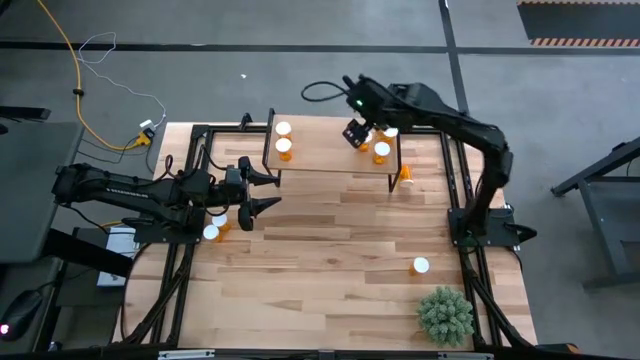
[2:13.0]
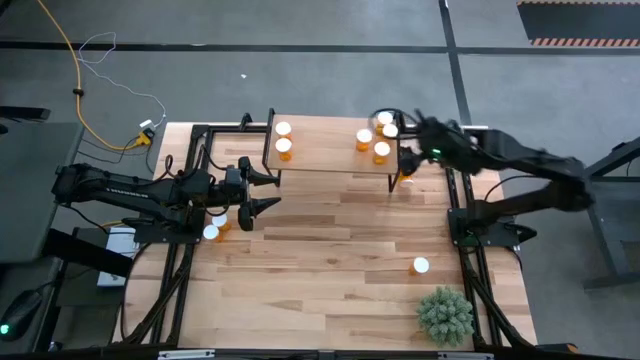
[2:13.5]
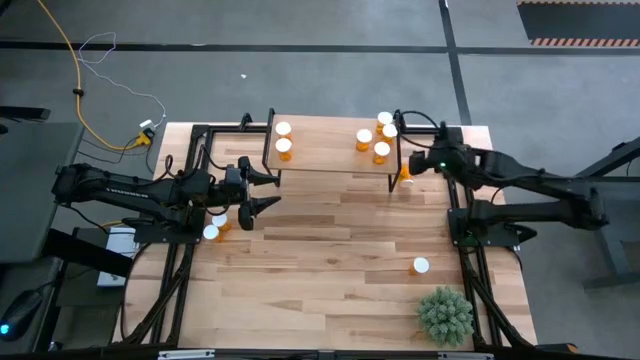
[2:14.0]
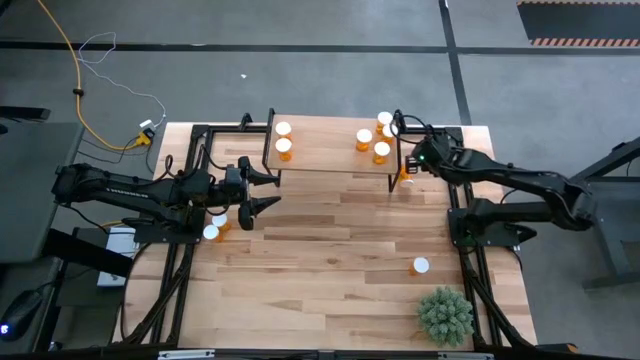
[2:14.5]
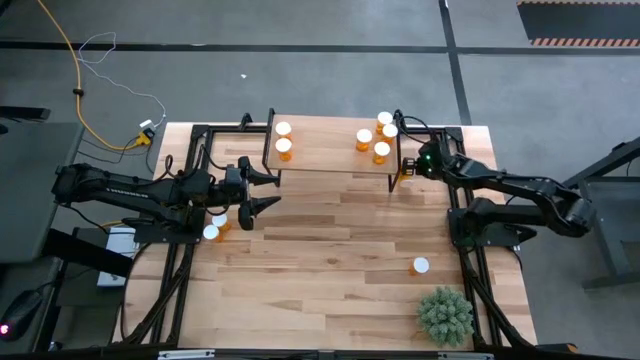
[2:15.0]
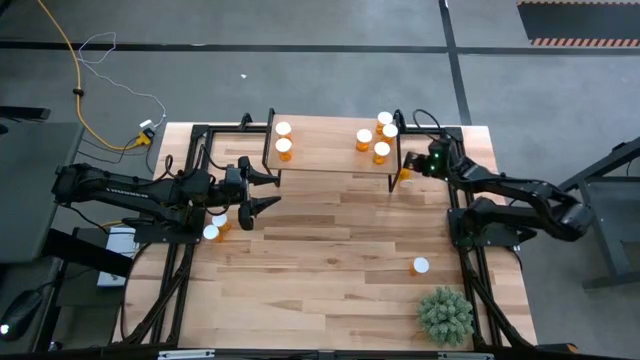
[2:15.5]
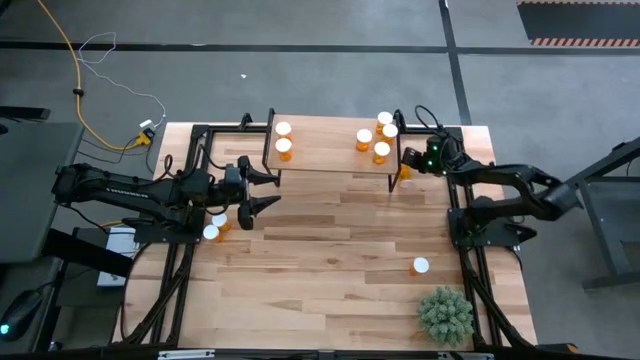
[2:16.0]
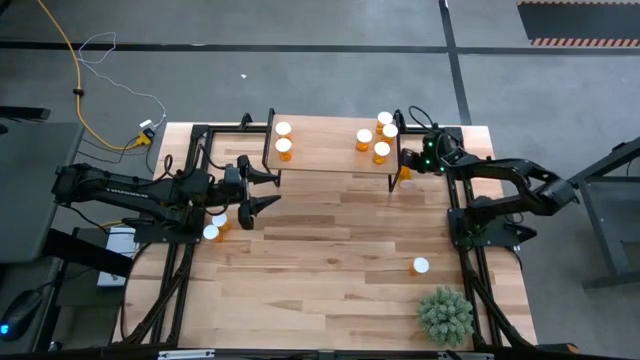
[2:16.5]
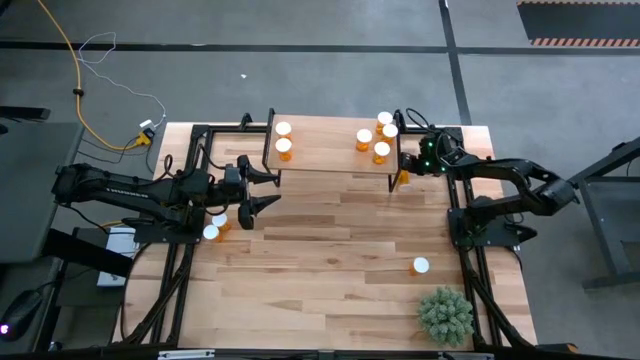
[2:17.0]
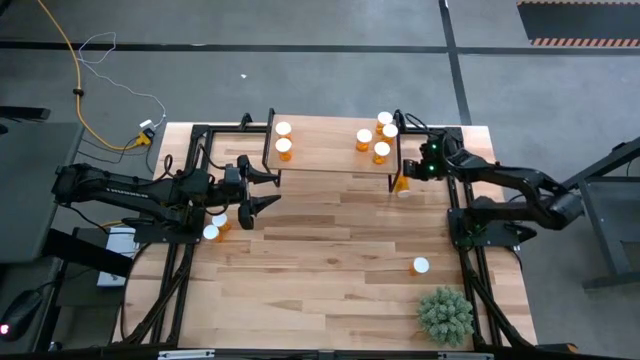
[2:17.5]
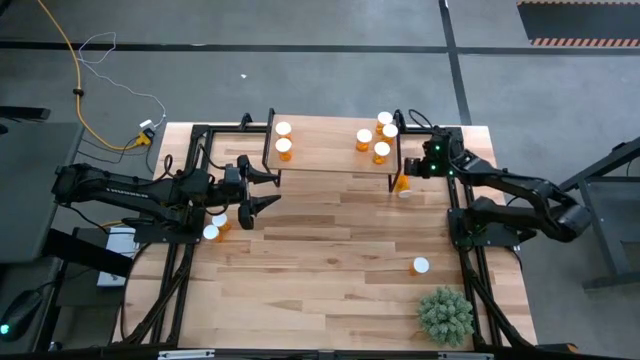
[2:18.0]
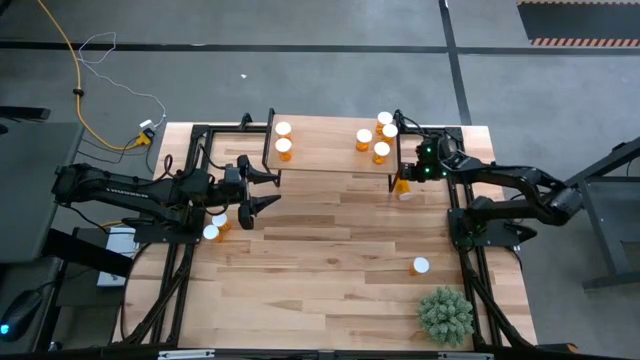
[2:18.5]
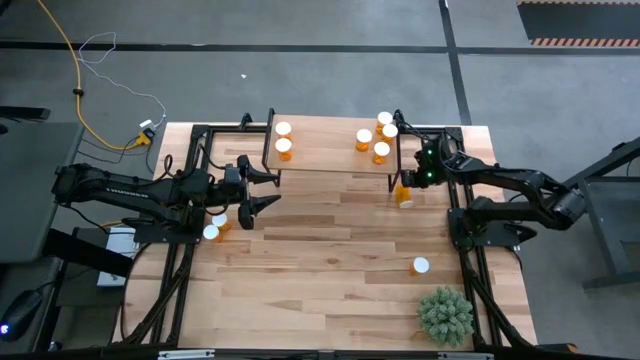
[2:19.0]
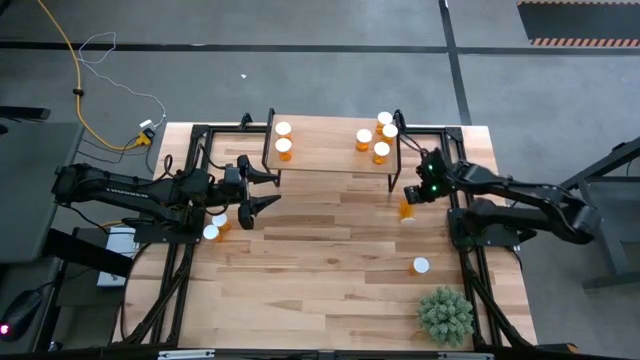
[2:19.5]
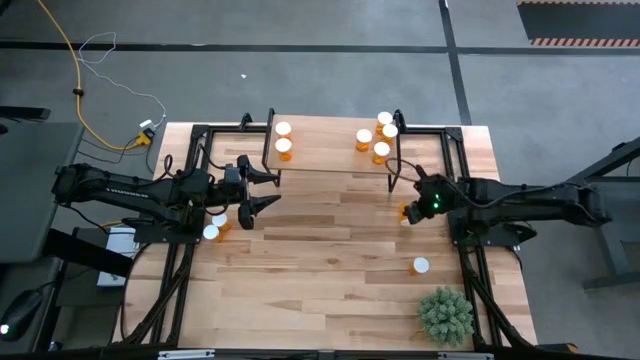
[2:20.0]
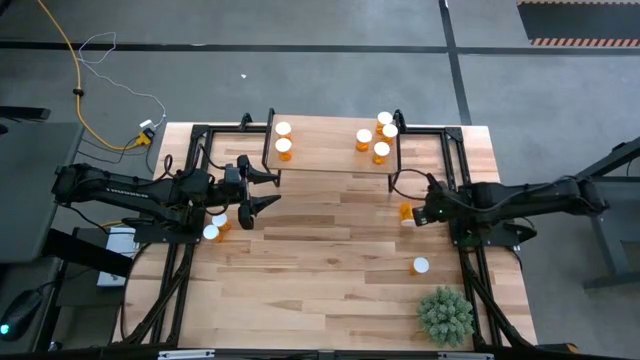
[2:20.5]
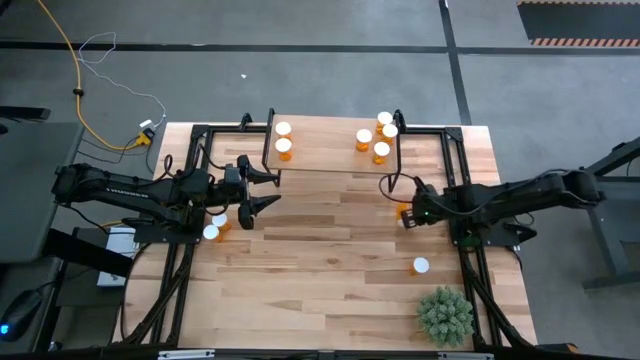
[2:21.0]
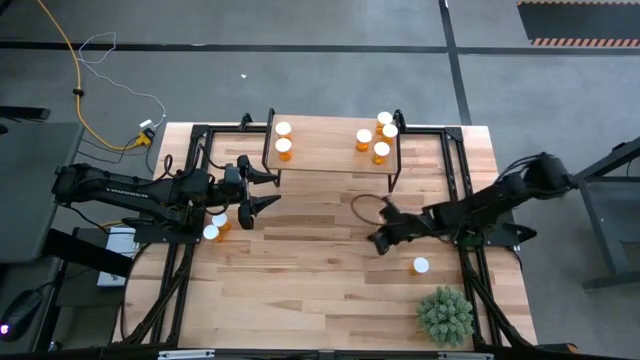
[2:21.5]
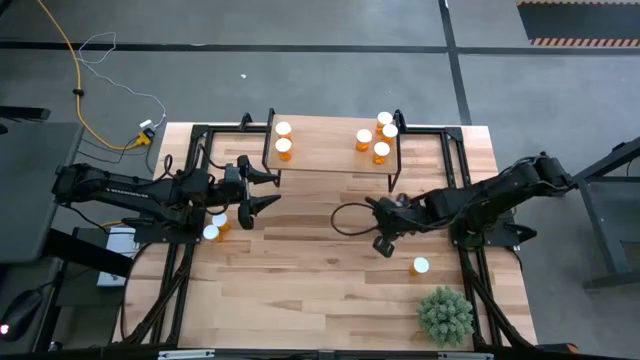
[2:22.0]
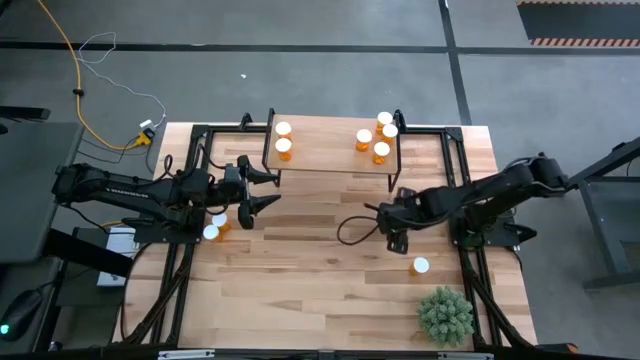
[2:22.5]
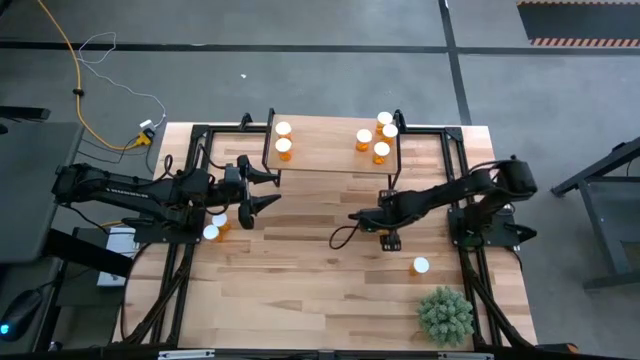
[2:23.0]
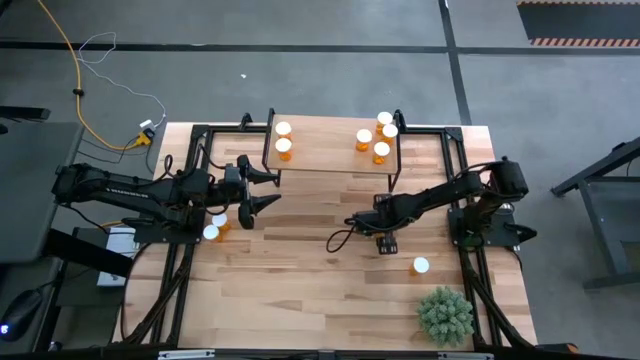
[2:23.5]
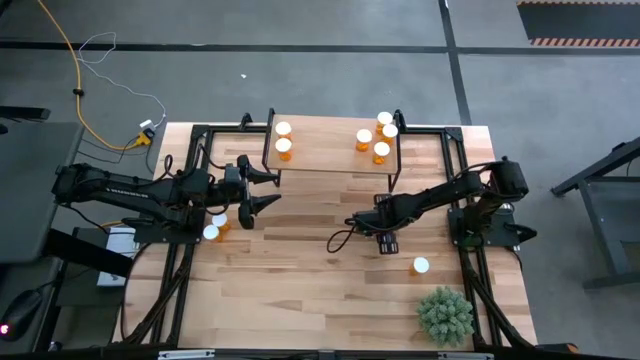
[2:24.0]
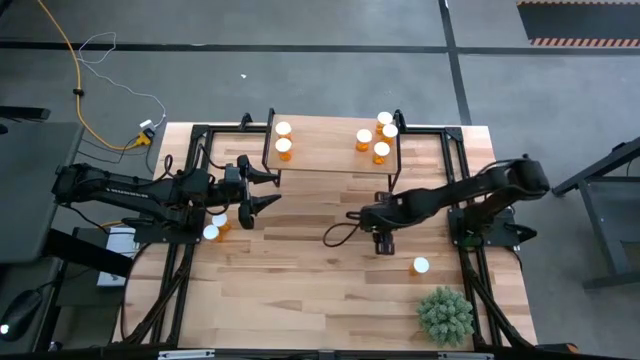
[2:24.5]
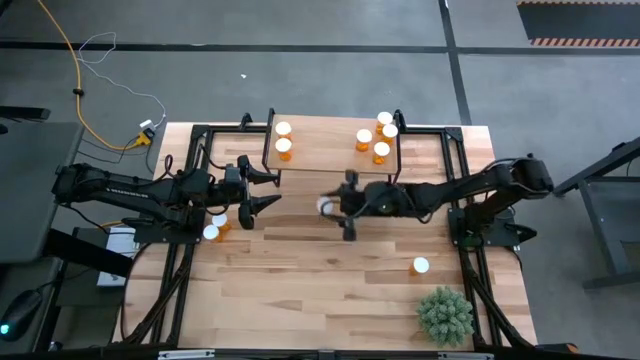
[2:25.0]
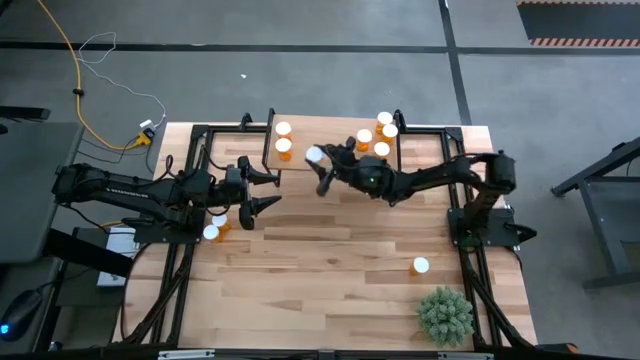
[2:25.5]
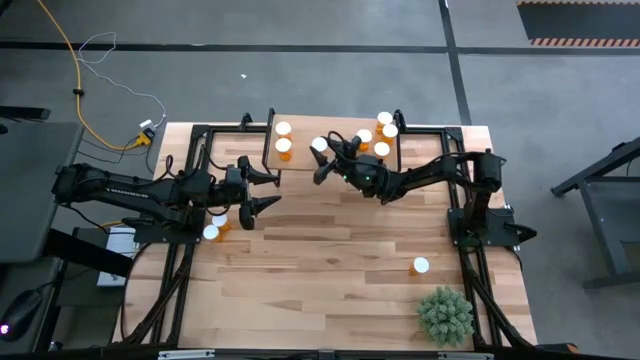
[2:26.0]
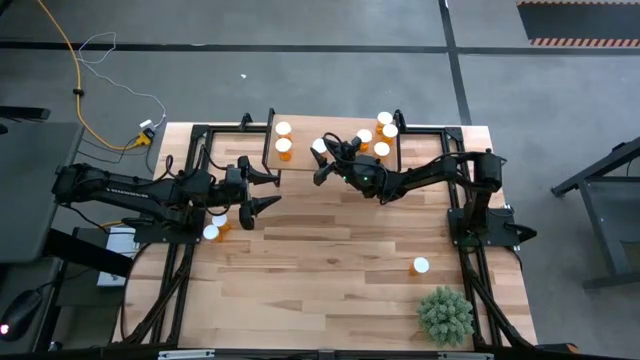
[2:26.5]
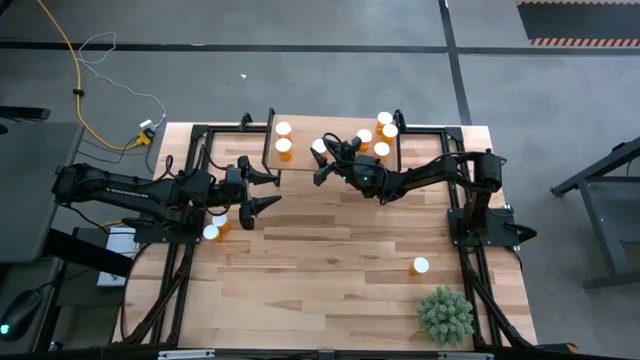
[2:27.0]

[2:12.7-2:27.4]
Task: Pick and place medicine bottles onto shelf by color
Put the yellow pill bottle on the shelf

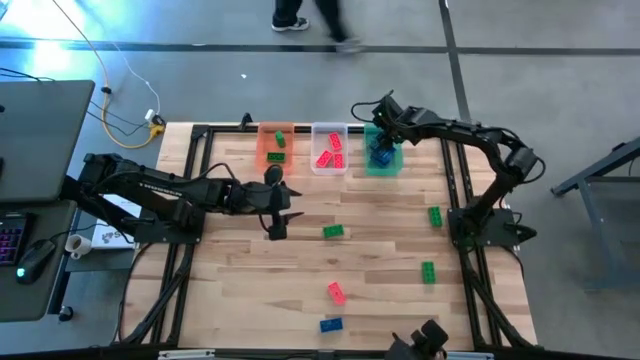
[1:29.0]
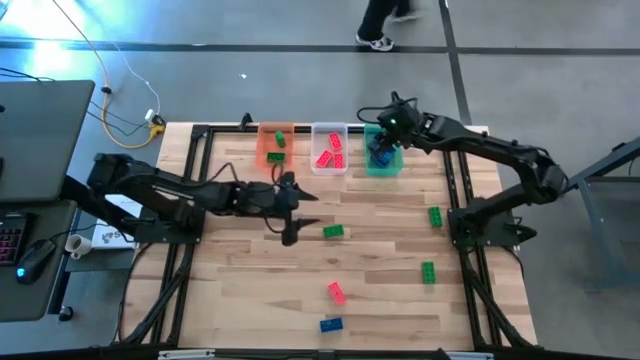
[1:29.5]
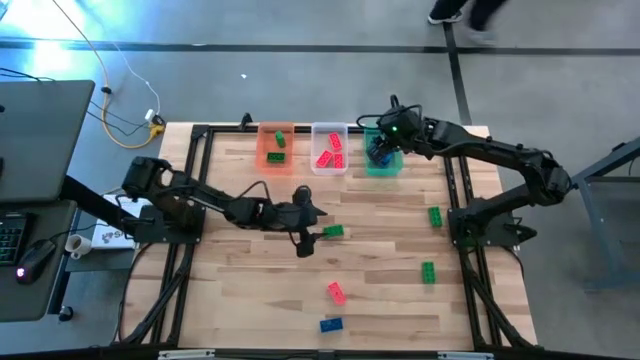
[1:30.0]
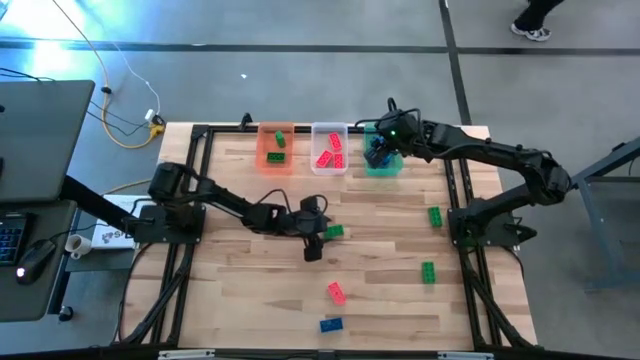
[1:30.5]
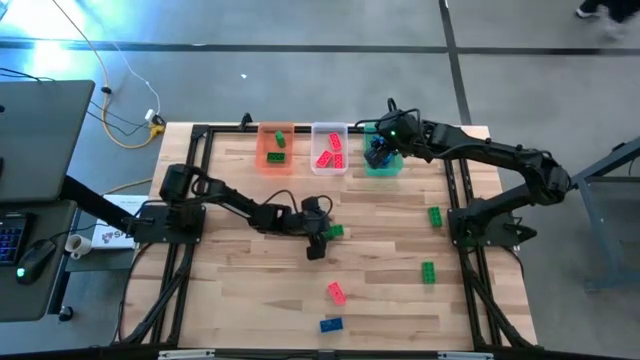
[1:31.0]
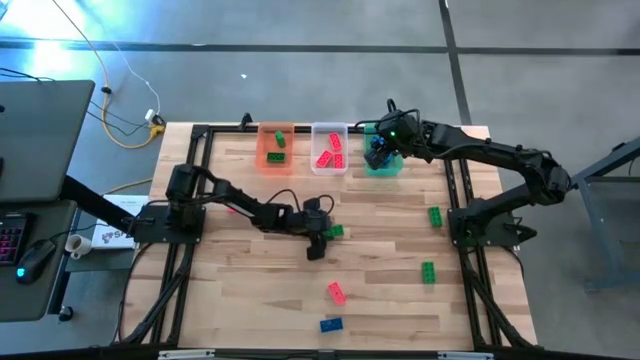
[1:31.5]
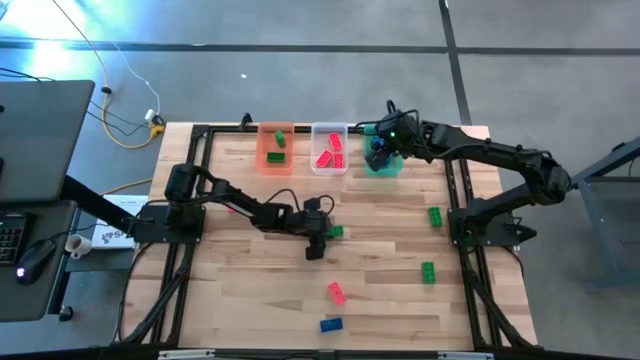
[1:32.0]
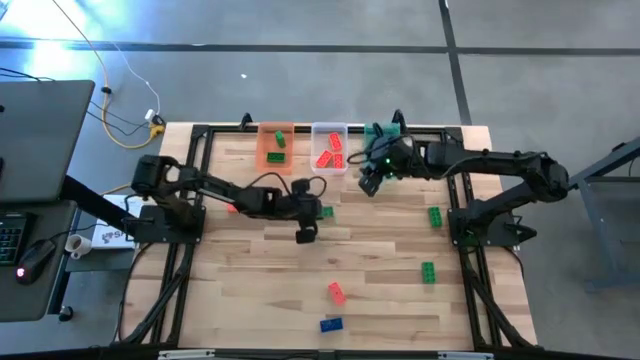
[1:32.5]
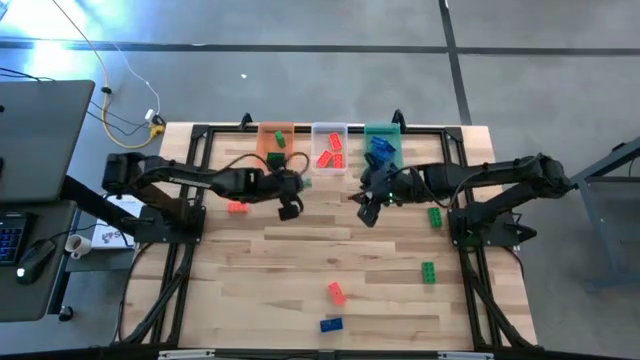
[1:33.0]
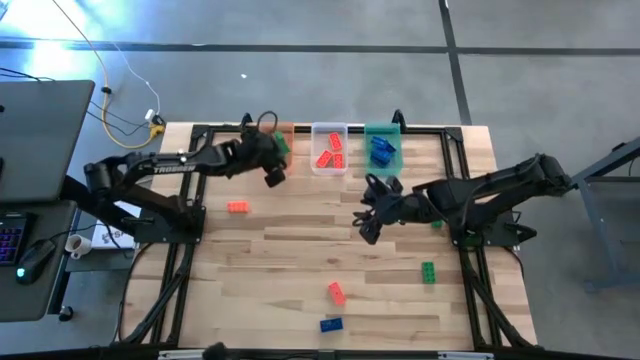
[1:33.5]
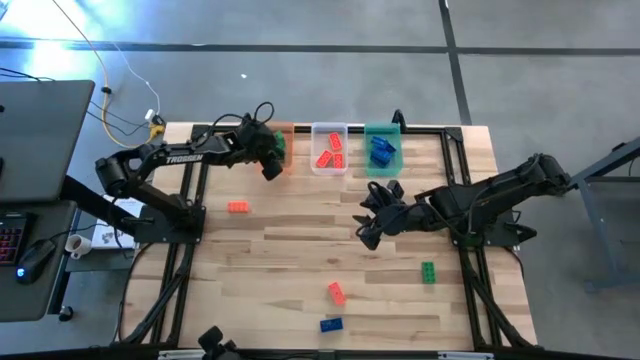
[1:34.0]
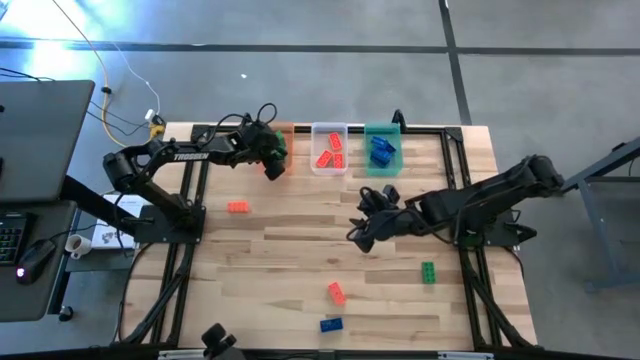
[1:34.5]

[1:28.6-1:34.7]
Task: Sort & place blocks by color
Put the green game piece into the orange bin
